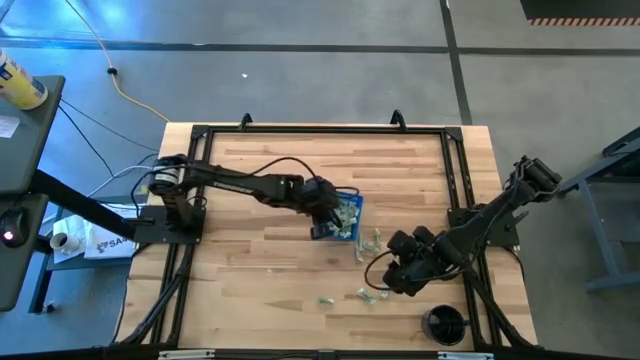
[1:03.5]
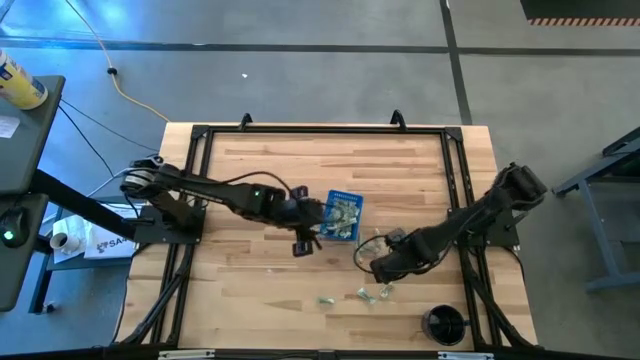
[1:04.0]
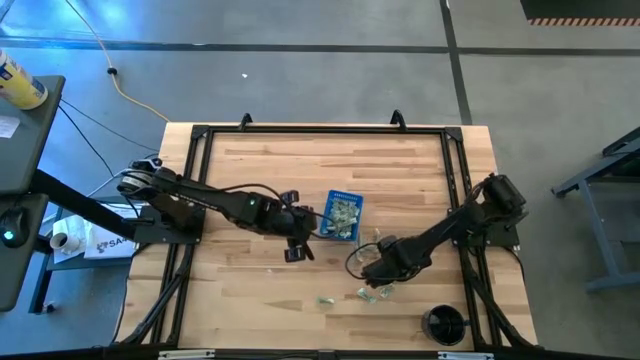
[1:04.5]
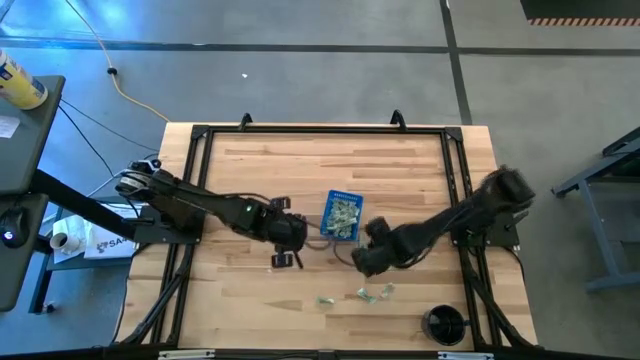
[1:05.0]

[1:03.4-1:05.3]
Task: Pick and place Stevia / Truvia into bins
Put the stevia packet into the blue basket

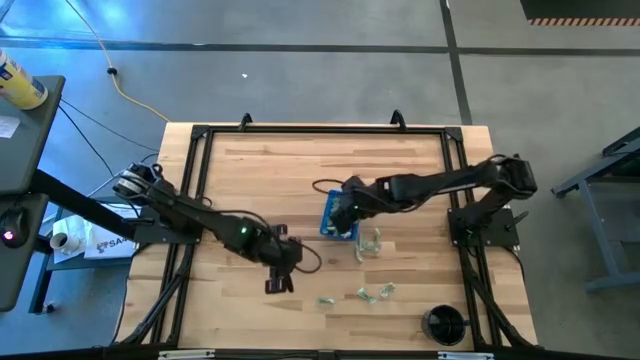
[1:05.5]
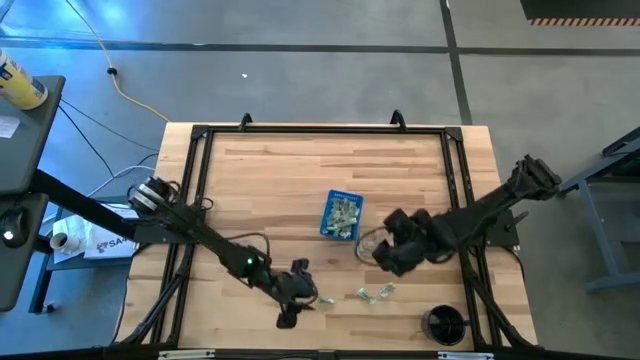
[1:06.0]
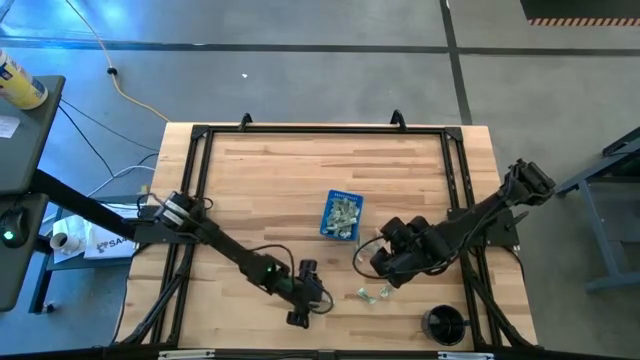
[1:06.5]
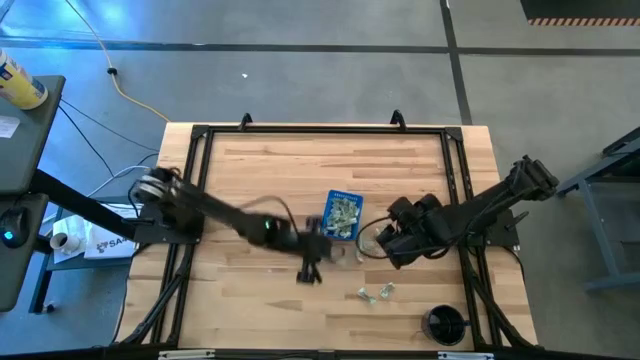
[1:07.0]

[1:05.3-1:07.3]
Put the stevia packet into the blue basket

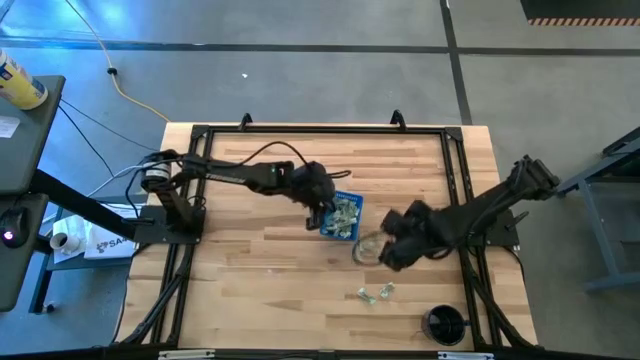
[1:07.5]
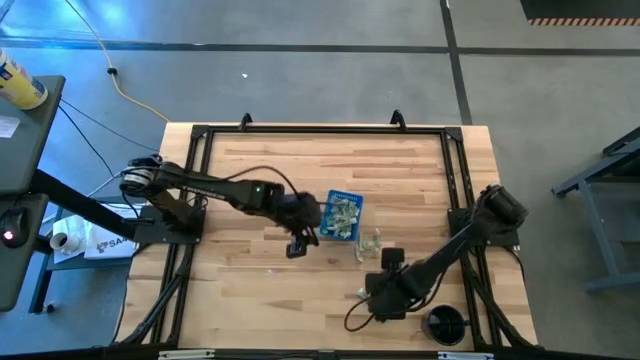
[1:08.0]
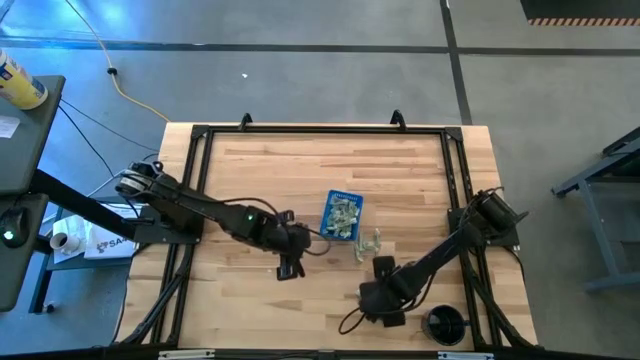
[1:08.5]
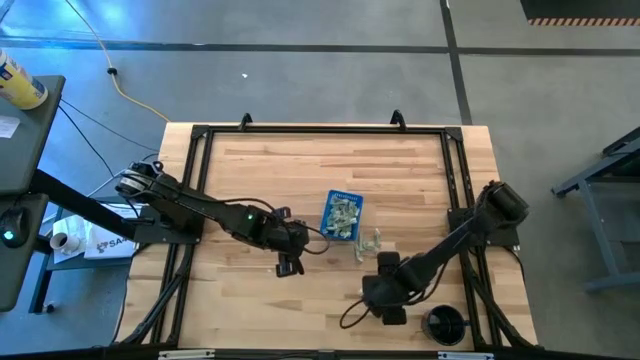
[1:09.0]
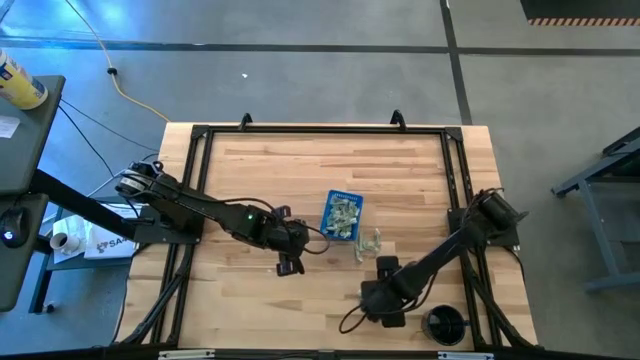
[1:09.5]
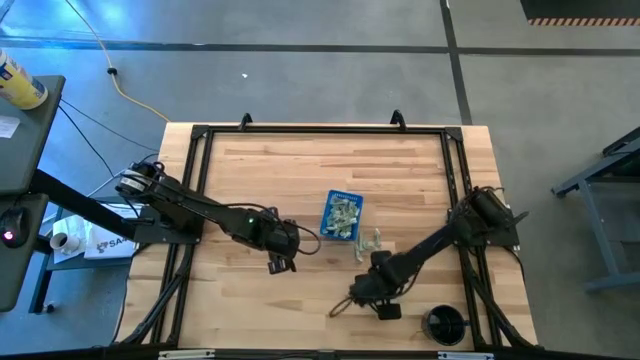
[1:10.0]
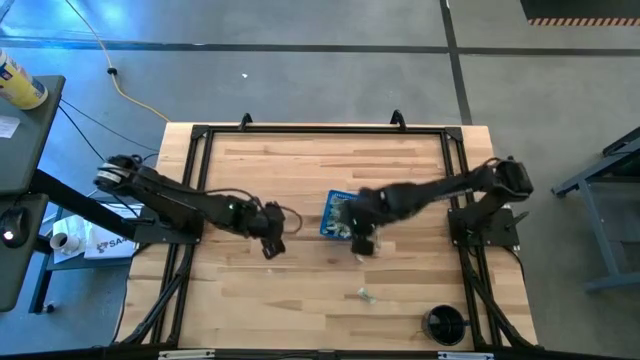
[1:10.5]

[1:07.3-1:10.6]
Put the stevia packet into the blue basket

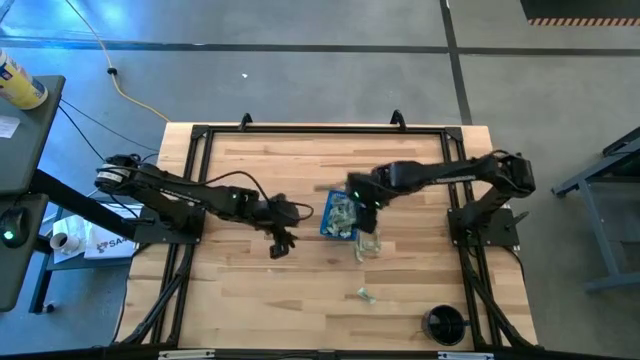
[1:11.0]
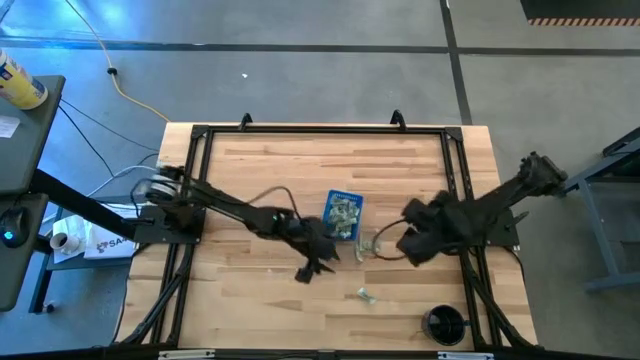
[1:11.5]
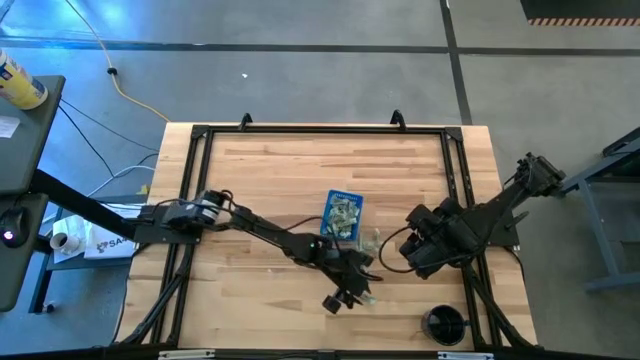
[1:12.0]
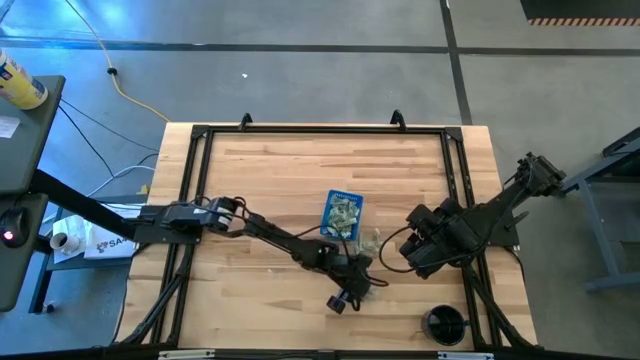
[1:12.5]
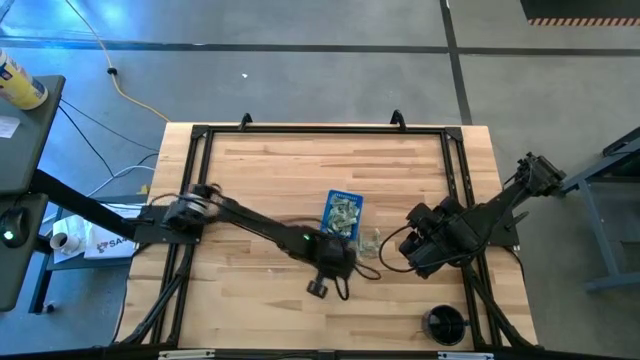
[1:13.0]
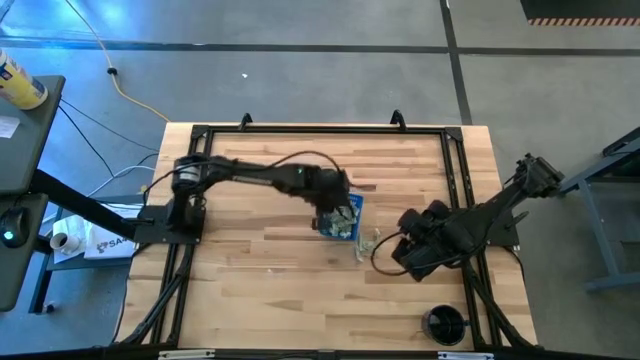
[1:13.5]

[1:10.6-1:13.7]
Put the stevia packet into the blue basket

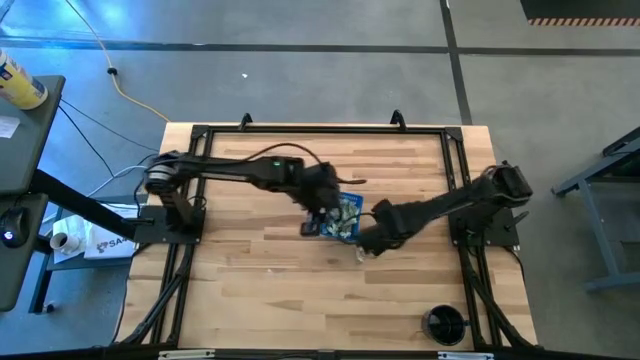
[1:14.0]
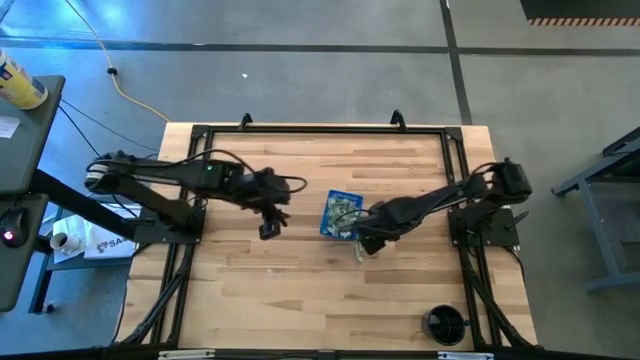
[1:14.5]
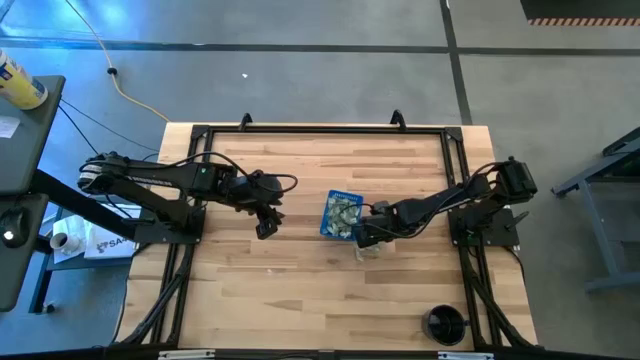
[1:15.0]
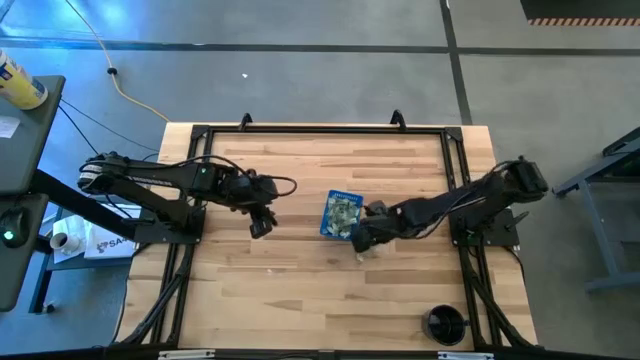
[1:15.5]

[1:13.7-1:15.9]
Put the stevia packet into the blue basket

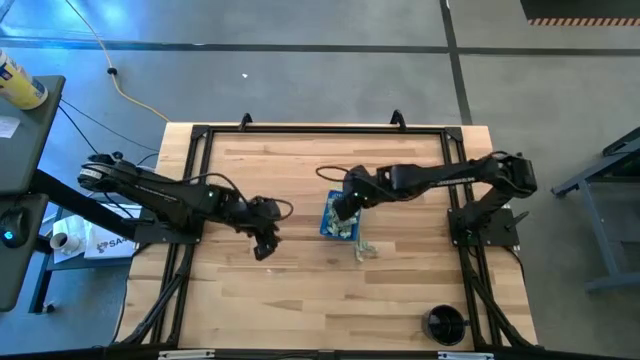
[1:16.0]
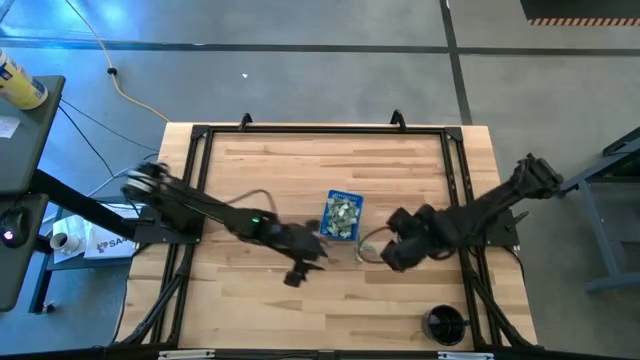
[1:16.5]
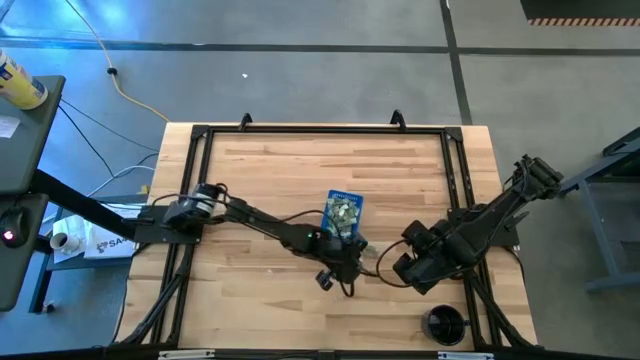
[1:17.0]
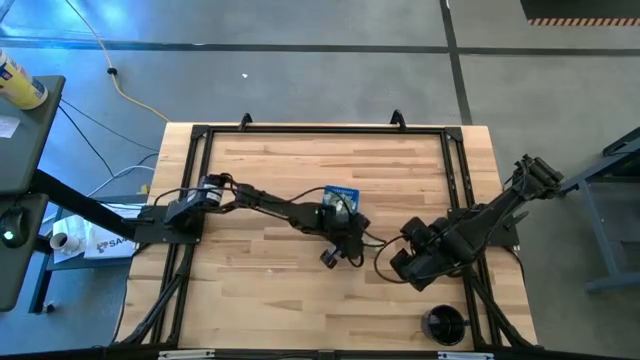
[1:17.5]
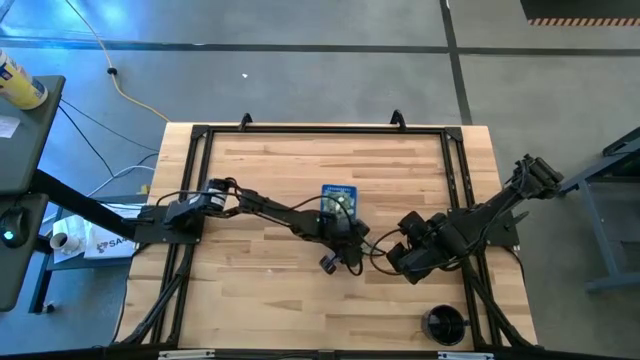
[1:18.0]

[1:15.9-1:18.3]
Put the stevia packet into the blue basket

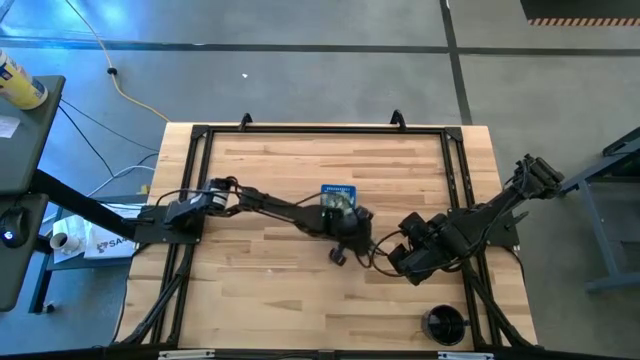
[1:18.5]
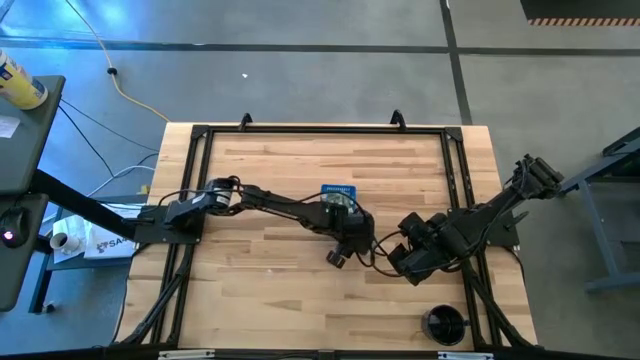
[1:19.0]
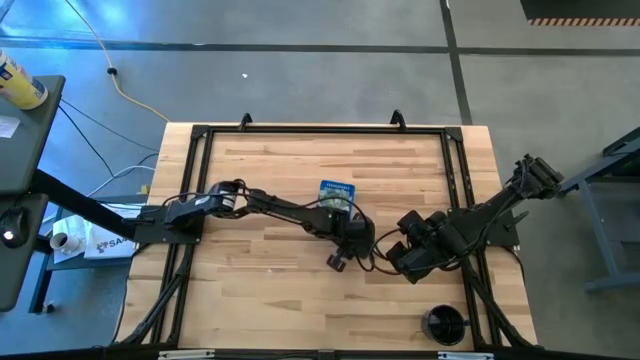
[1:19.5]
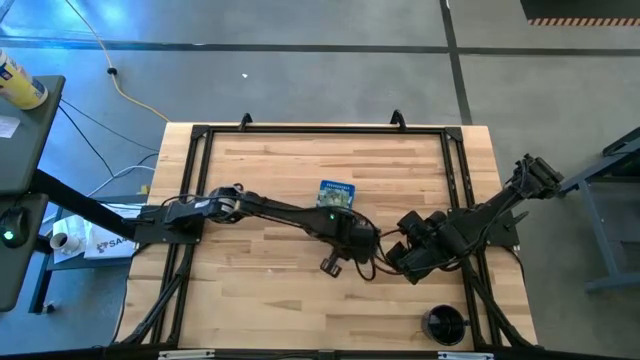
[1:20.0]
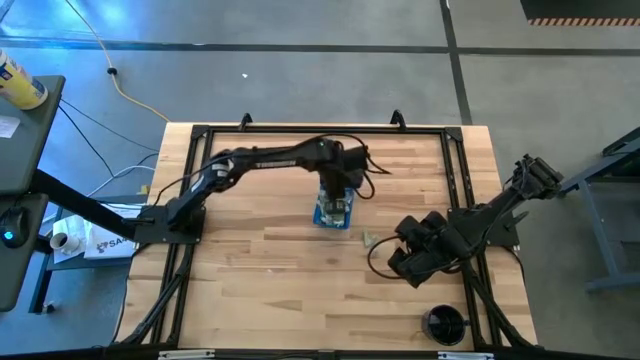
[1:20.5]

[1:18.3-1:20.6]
Put the stevia packet into the blue basket

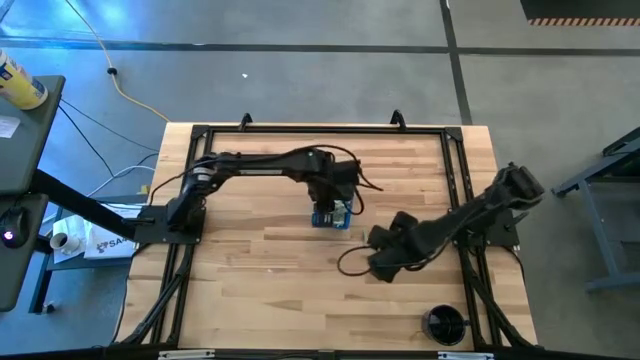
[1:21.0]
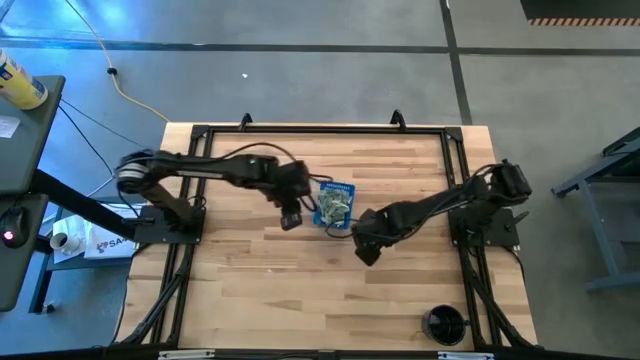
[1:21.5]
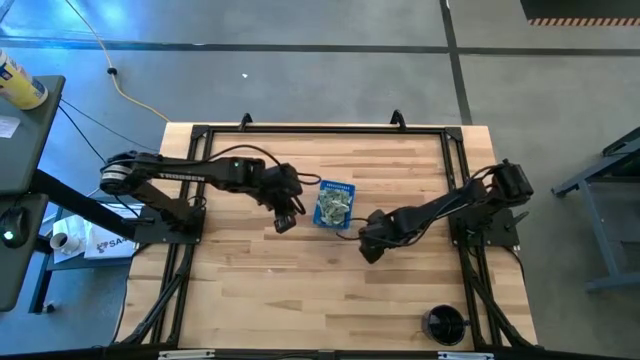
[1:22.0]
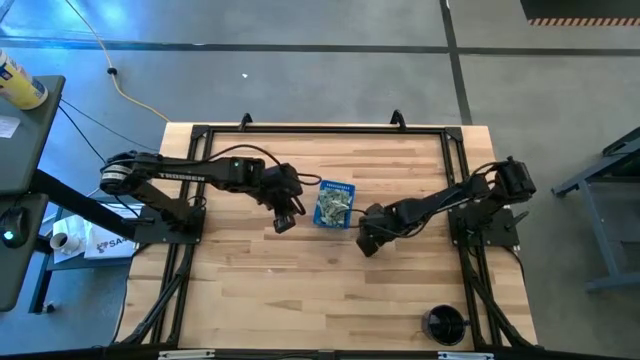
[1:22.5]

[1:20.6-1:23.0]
Put the stevia packet into the blue basket

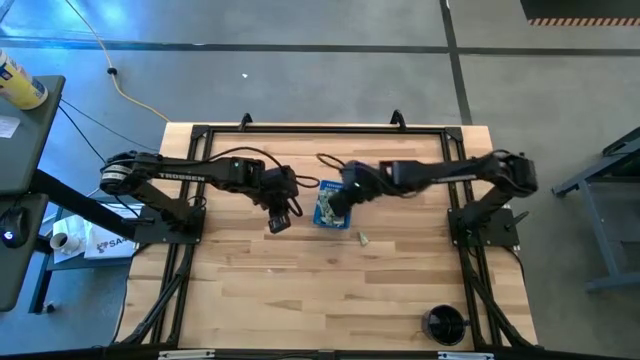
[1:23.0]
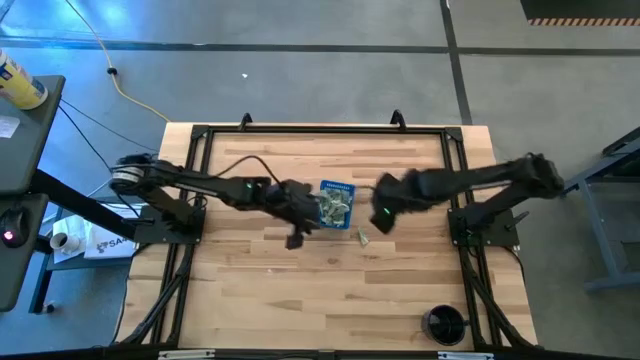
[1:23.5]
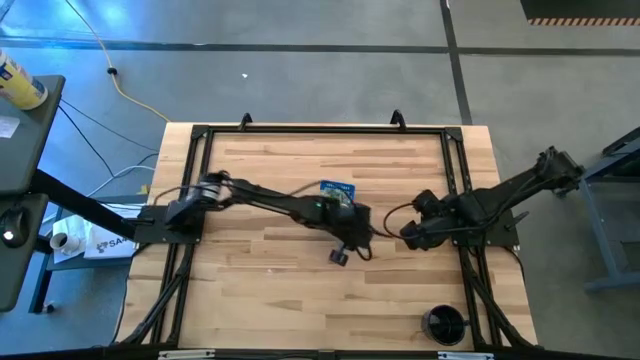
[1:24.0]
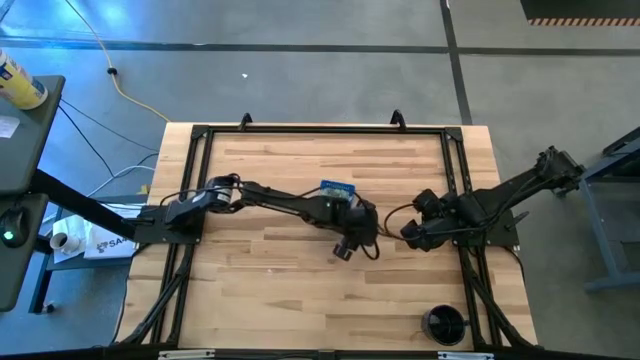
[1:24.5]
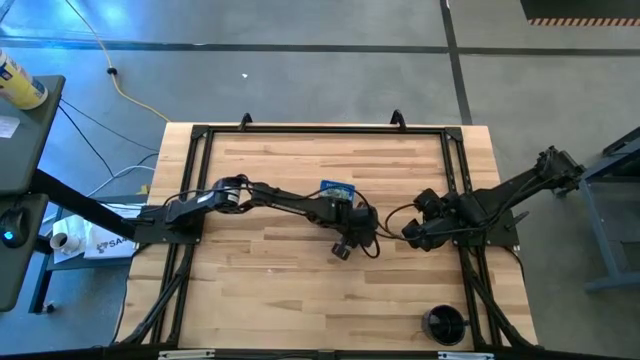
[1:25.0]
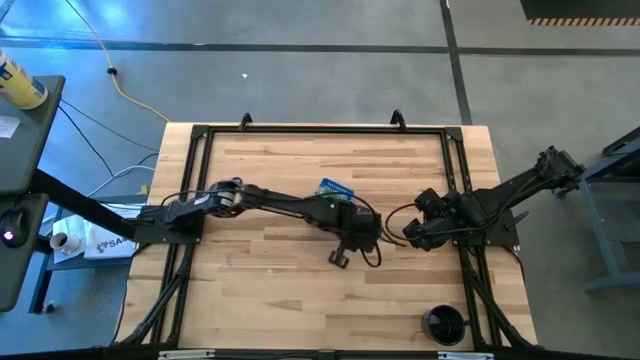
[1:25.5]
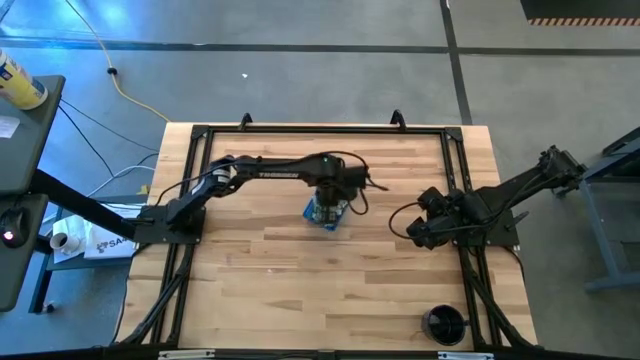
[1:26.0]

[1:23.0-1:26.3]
Put the stevia packet into the blue basket
